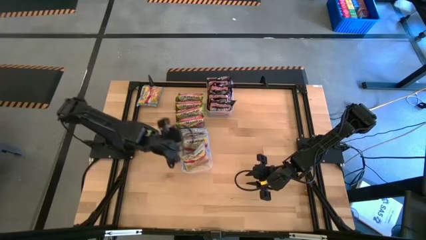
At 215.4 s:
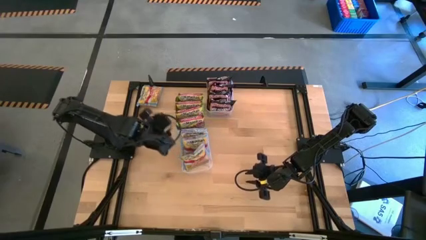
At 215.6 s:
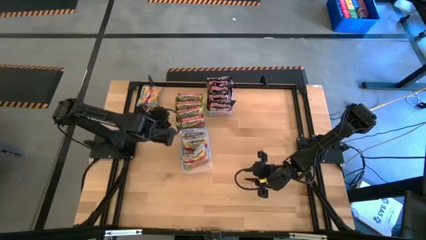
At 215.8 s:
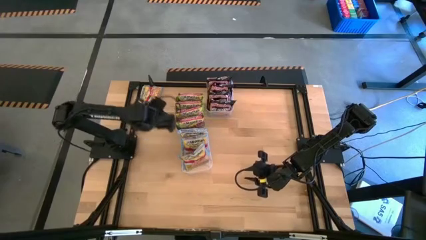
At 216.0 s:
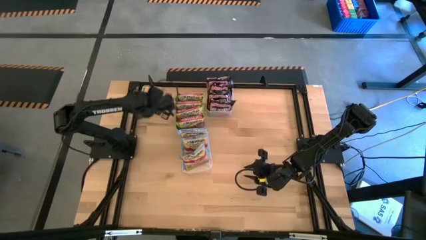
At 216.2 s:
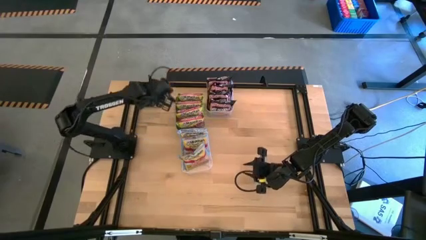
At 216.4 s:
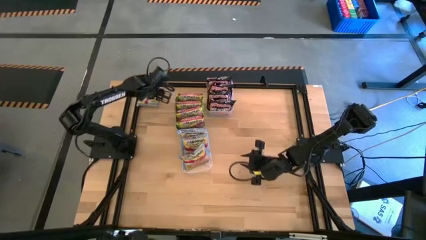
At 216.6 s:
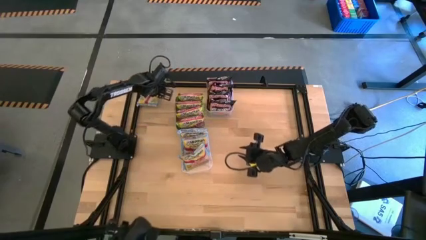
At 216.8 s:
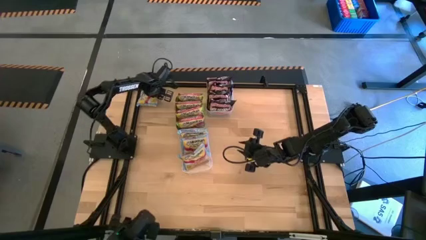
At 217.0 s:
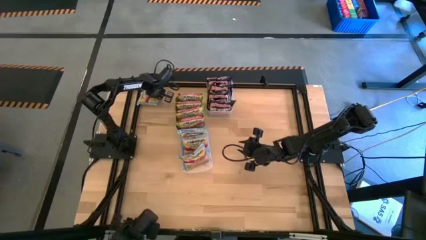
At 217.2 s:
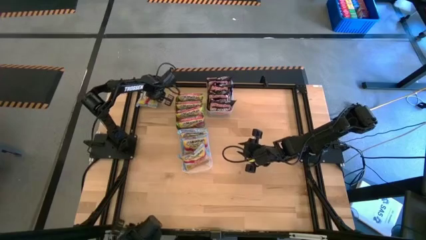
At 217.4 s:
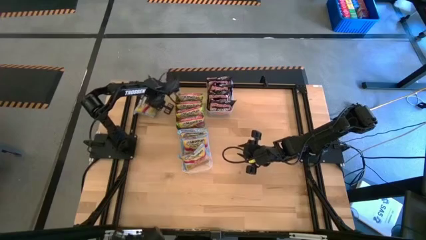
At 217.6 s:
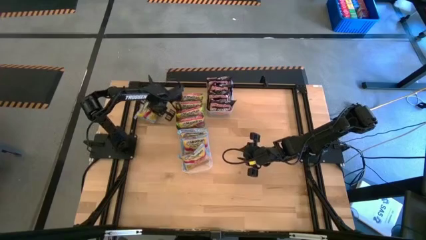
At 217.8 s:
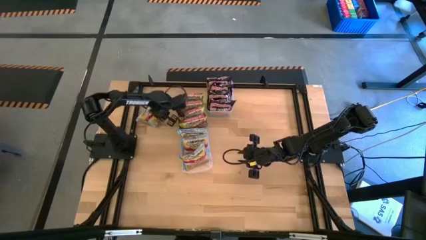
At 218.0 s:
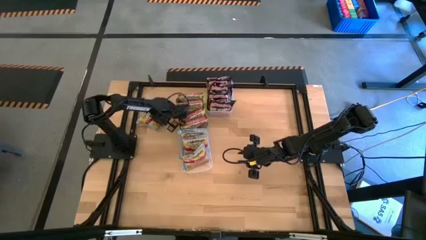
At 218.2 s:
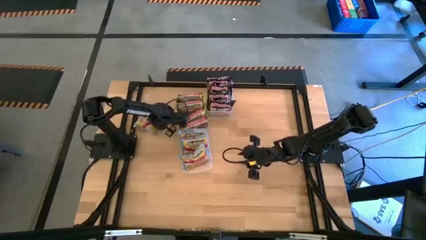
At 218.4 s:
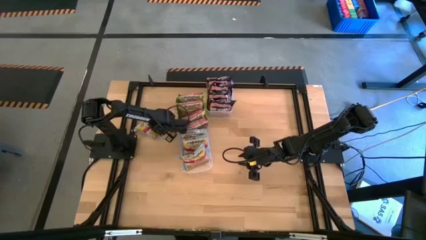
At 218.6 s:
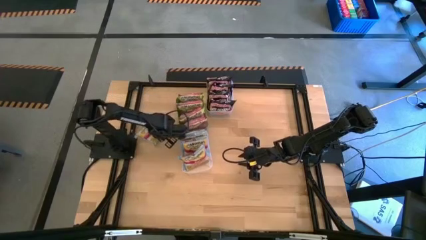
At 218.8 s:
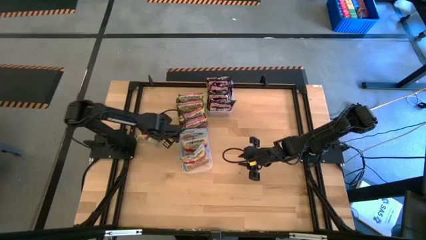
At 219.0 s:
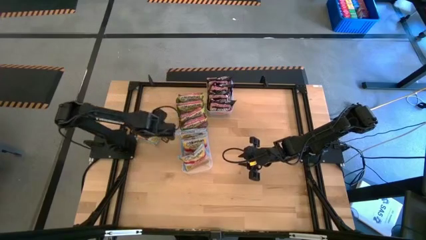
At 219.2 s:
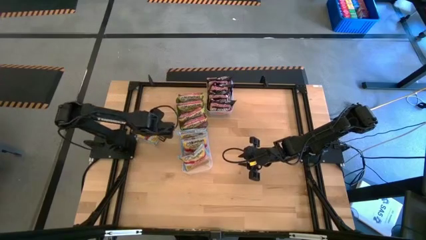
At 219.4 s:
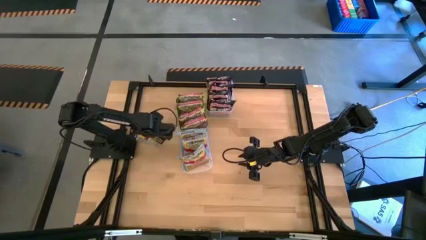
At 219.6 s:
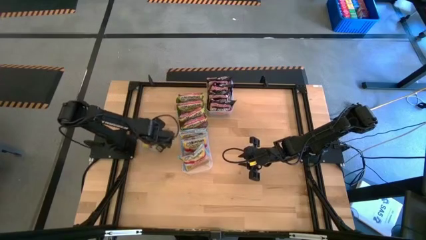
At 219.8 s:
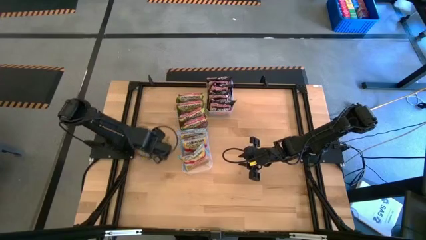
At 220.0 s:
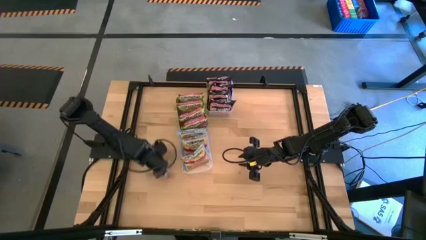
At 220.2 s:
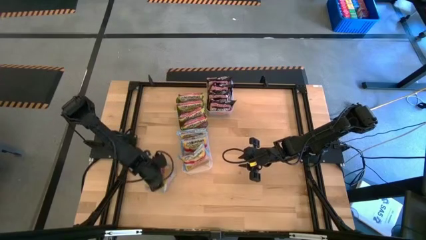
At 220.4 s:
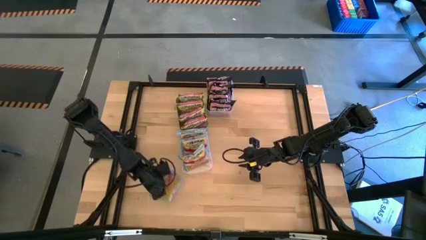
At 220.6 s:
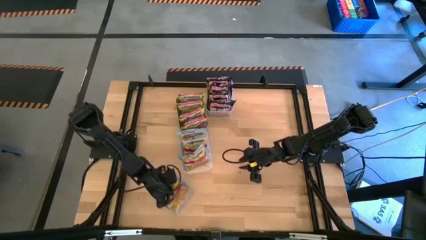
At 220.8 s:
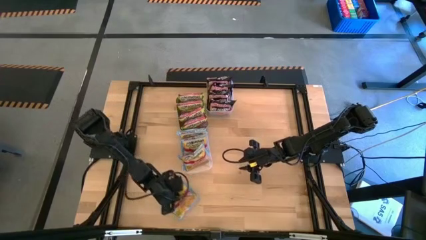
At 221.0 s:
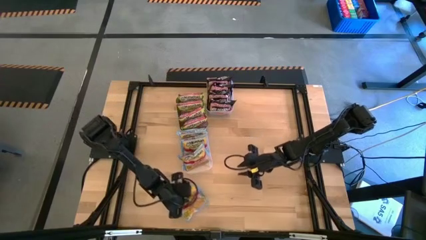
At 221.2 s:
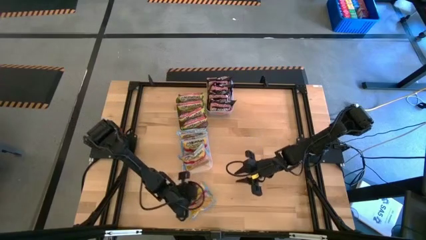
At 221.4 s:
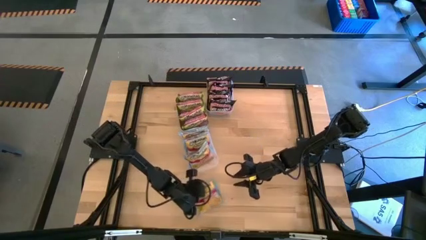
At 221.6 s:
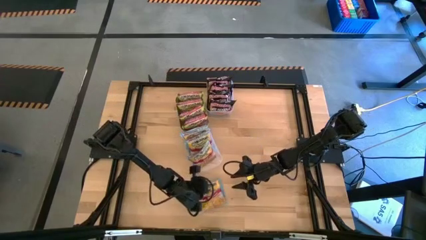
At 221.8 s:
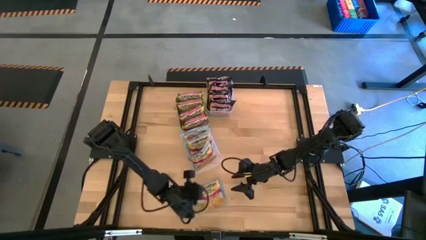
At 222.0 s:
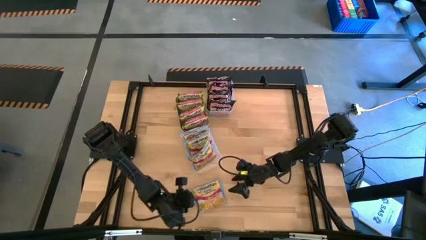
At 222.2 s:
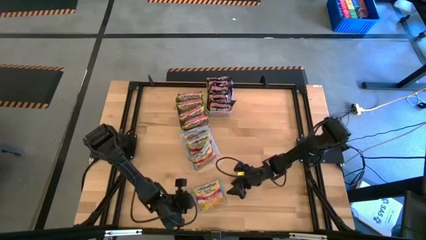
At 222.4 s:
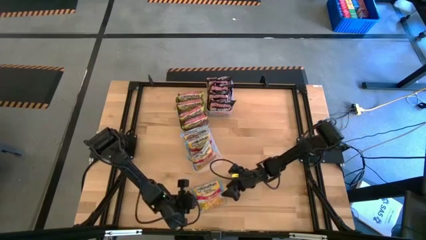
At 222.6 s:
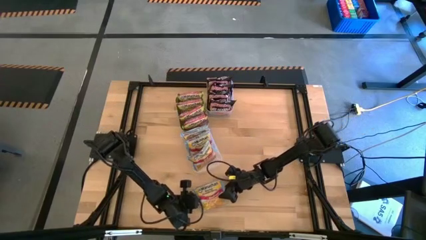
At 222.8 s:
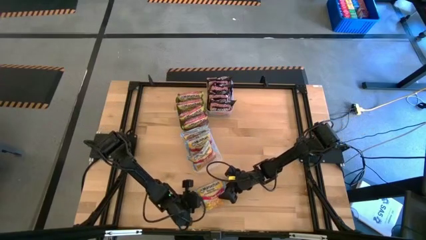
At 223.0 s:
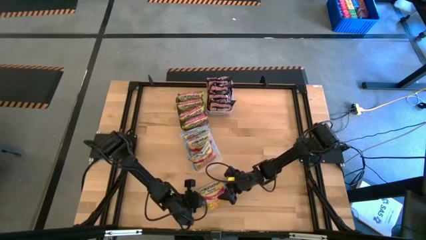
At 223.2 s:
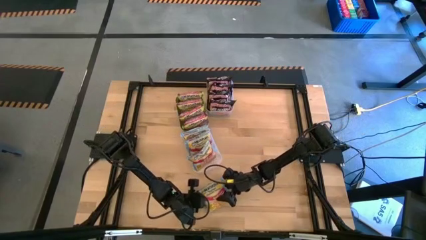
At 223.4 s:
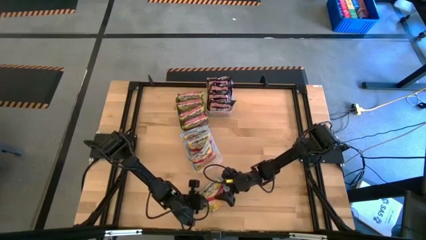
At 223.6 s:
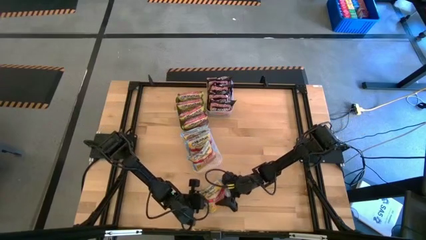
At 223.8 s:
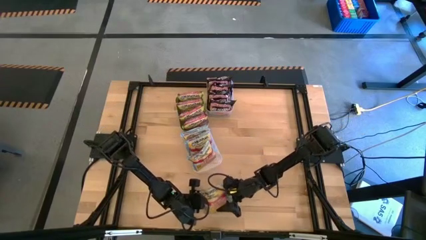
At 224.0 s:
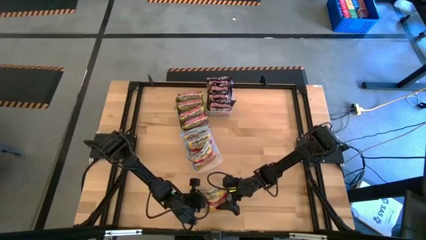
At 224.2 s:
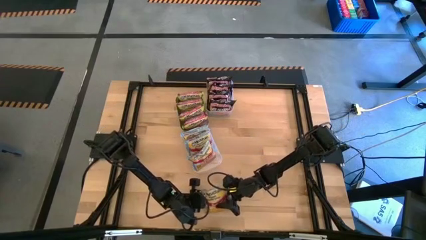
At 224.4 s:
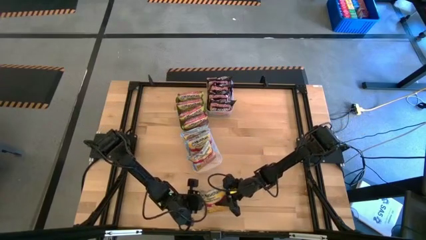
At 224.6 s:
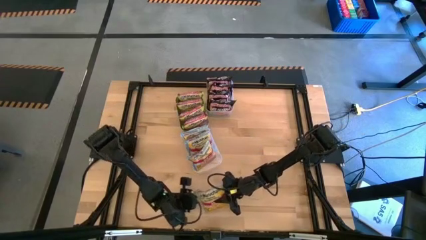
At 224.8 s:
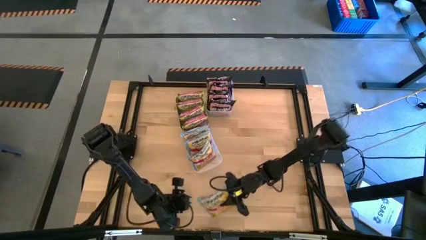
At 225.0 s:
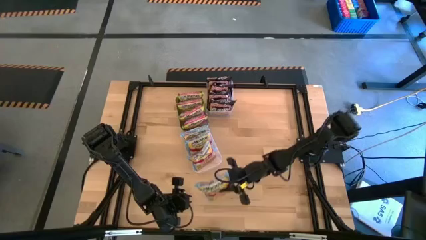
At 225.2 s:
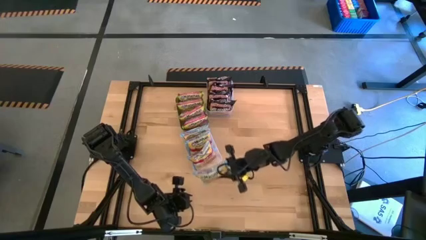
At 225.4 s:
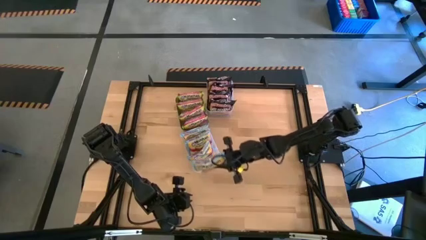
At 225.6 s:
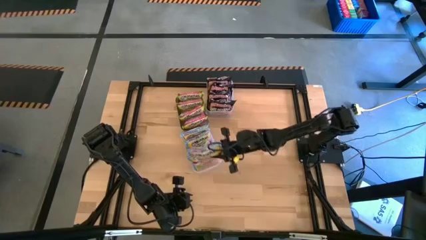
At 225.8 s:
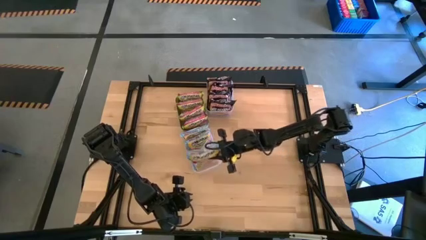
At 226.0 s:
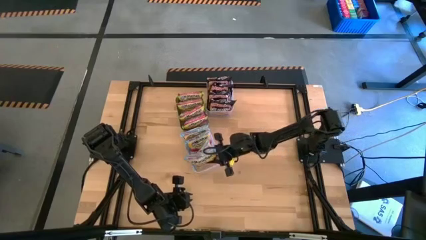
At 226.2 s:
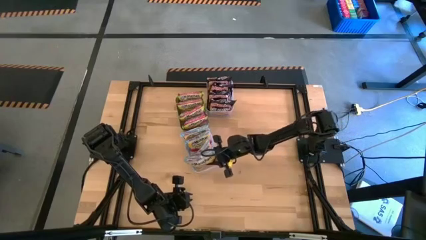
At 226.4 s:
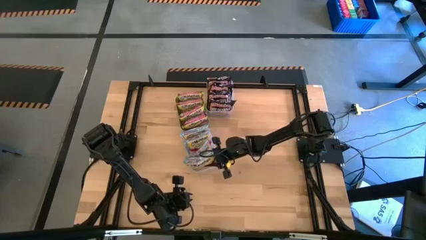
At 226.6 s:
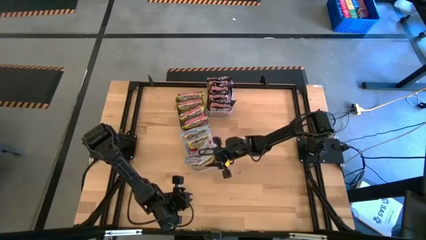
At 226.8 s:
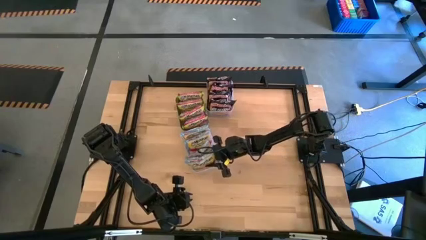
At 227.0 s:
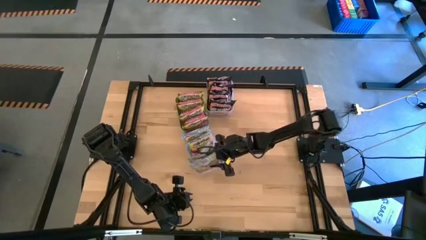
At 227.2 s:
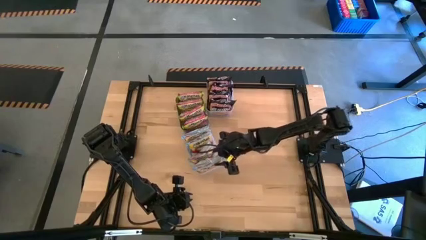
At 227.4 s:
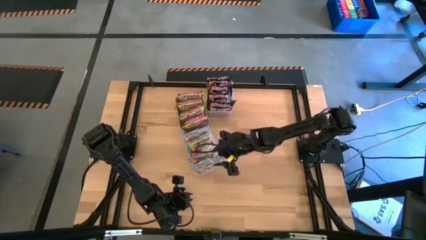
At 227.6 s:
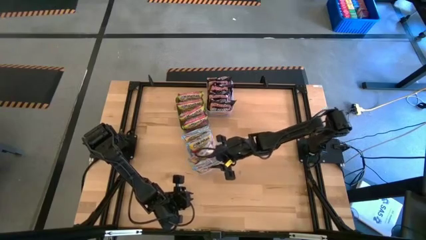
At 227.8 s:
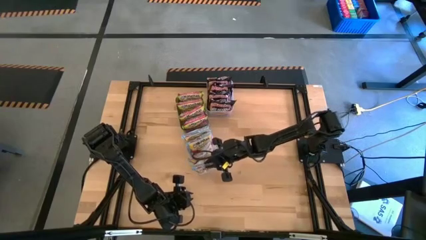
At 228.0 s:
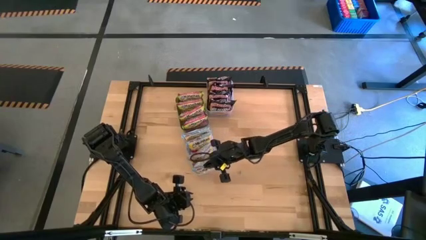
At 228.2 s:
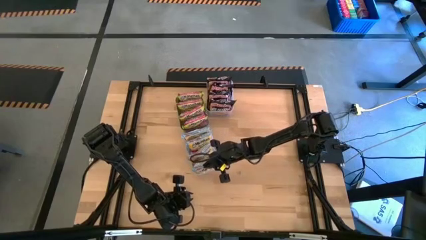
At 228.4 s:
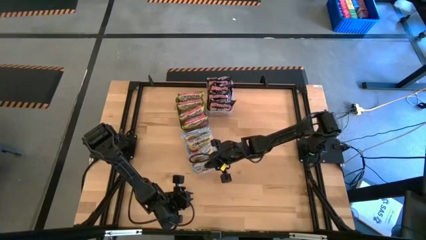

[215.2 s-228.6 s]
Task: Sort Maruchan noodles
Put the blue noodle pack into the bottom transparent bin

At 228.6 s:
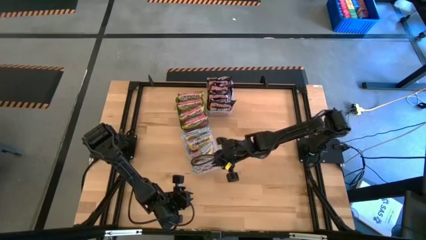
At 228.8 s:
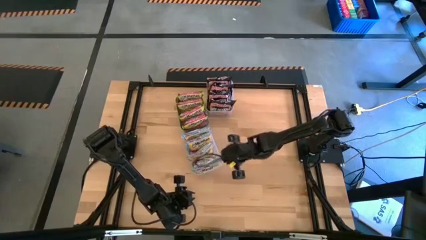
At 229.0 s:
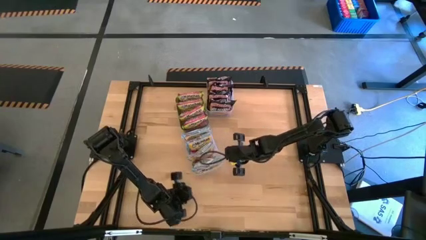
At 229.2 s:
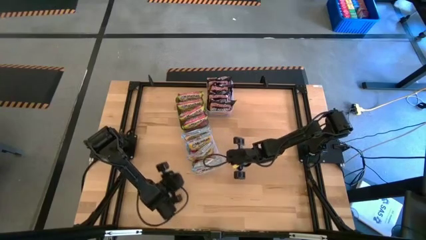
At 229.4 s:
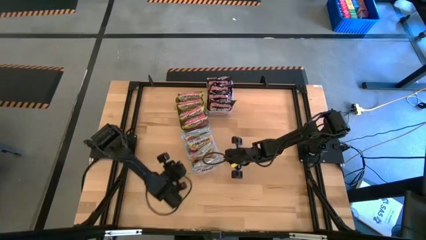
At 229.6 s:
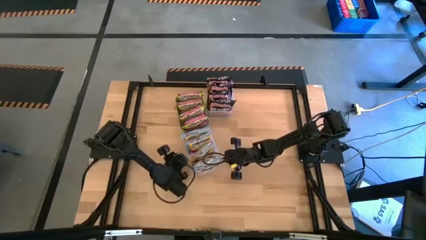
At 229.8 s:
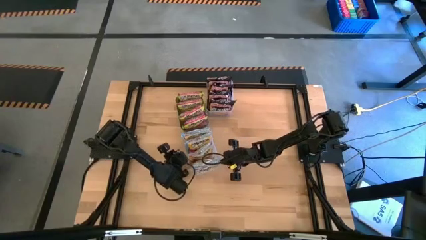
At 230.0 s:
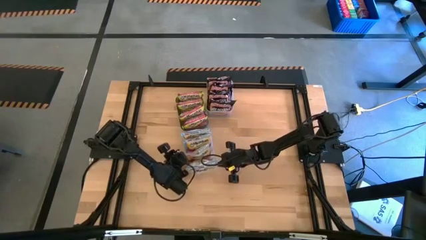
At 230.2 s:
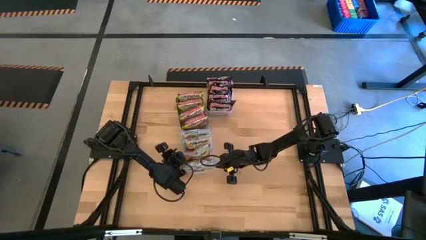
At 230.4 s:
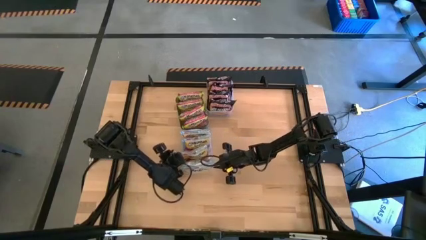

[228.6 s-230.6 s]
Adjust the bottom transparent bin

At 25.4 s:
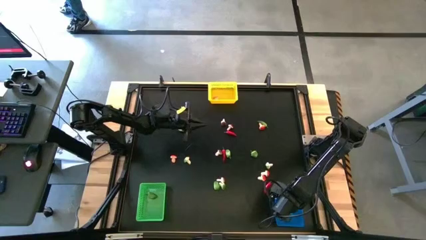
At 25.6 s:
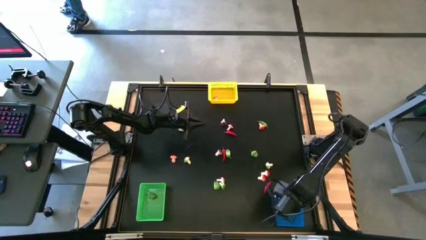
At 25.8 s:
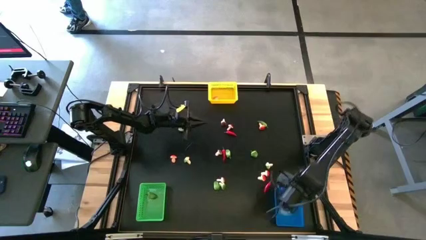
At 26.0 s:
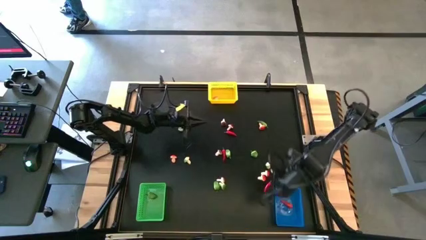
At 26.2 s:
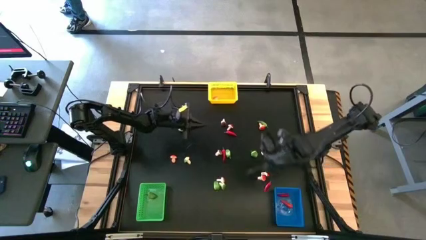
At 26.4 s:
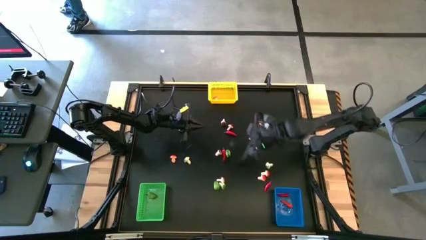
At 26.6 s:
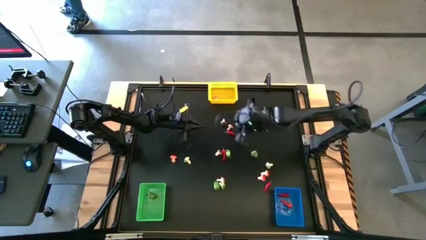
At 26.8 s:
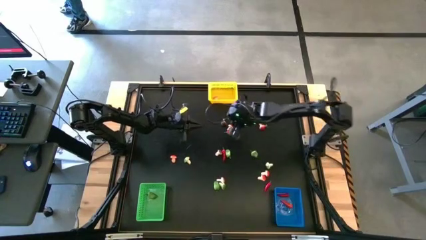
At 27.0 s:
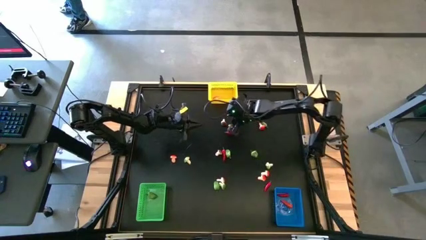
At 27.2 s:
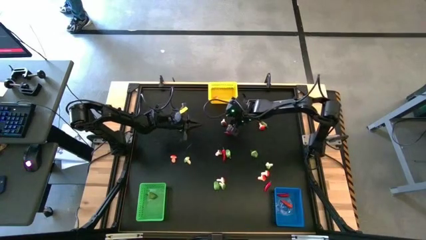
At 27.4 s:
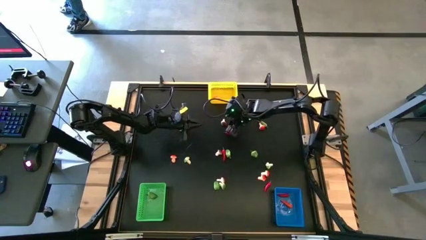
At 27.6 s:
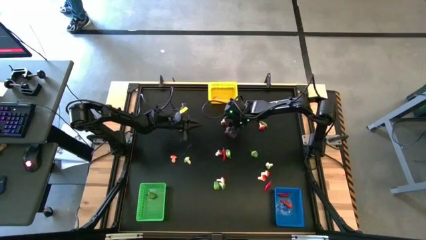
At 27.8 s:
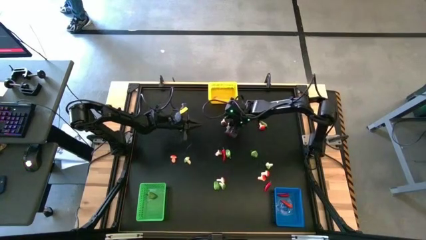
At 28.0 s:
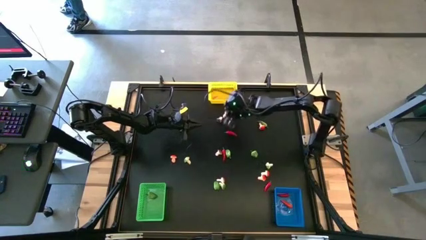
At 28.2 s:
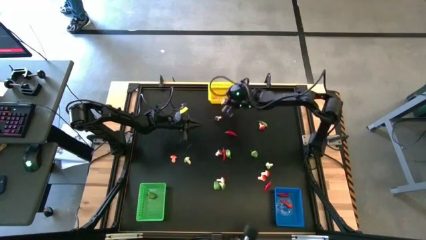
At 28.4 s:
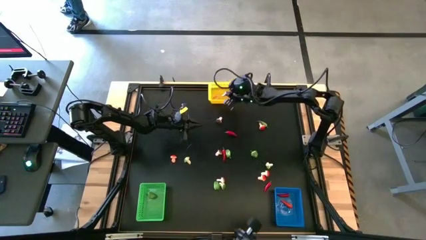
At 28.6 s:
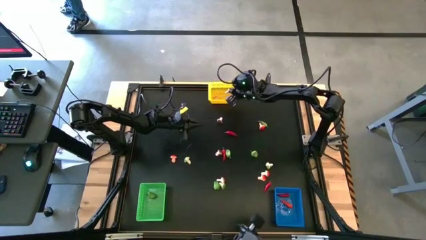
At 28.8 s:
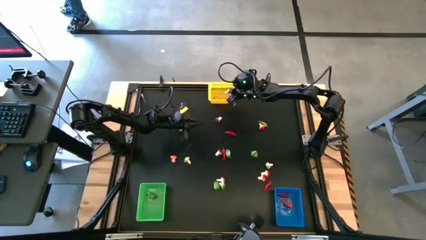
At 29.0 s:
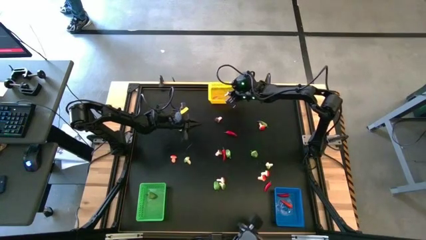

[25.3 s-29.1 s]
Task: Sort produce into baskets
Put the top center brown mushroom into the yellow bin
